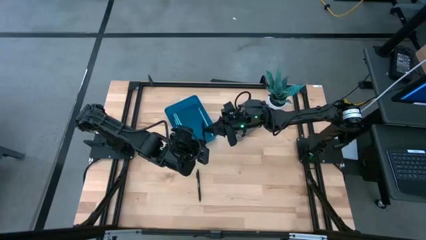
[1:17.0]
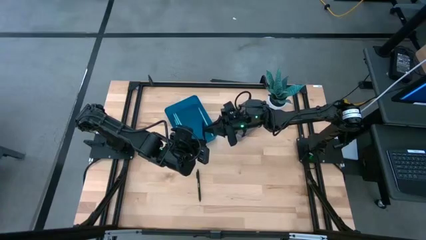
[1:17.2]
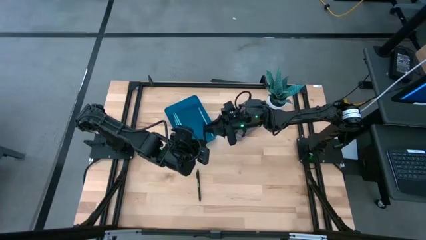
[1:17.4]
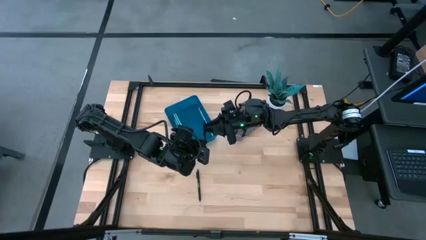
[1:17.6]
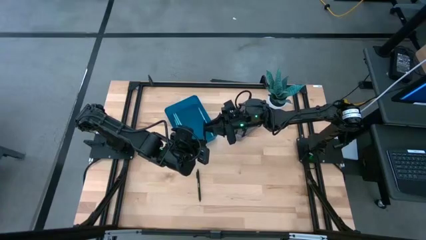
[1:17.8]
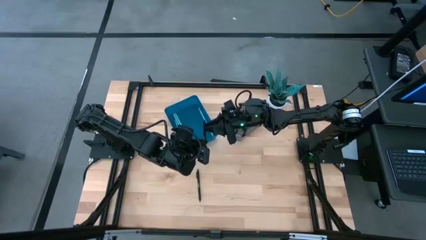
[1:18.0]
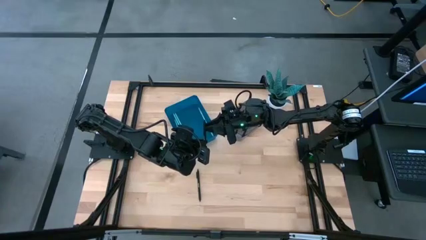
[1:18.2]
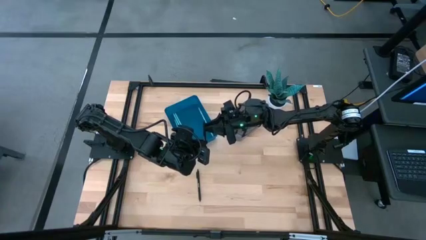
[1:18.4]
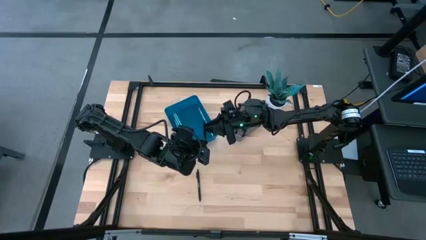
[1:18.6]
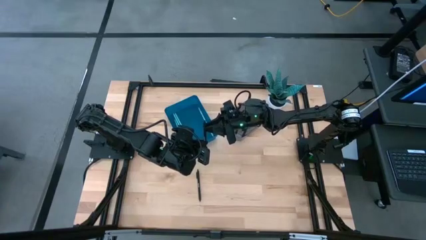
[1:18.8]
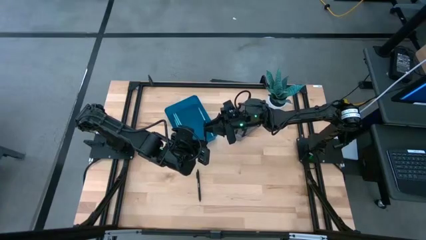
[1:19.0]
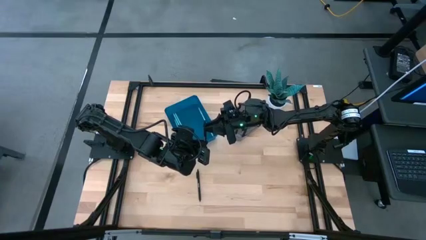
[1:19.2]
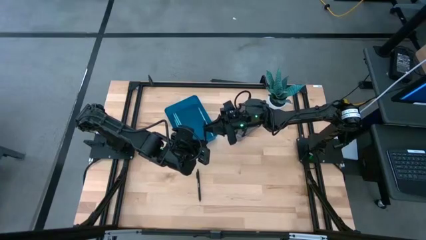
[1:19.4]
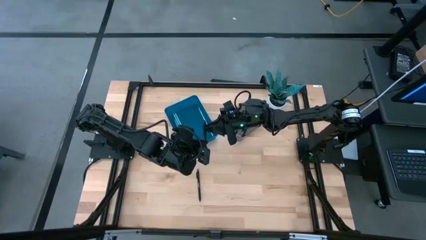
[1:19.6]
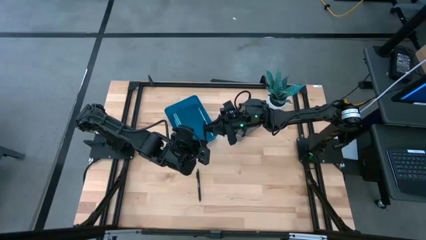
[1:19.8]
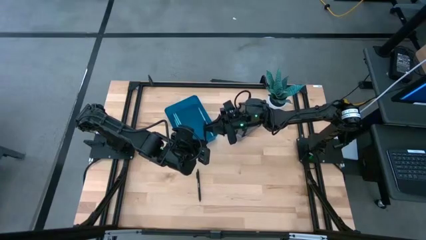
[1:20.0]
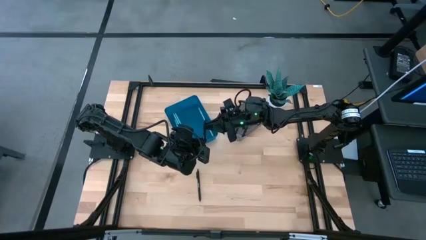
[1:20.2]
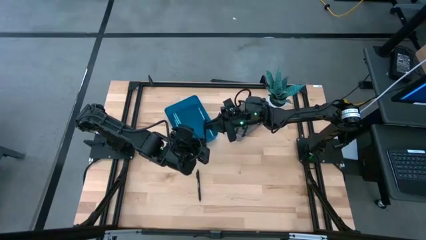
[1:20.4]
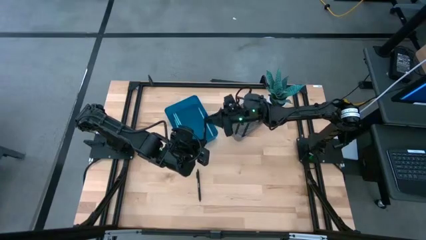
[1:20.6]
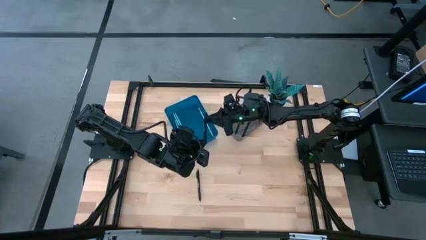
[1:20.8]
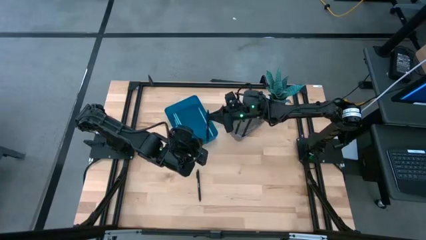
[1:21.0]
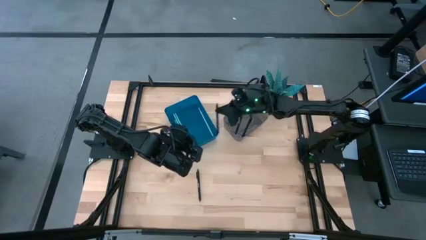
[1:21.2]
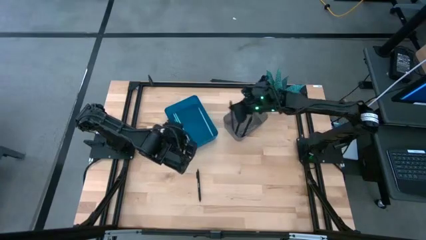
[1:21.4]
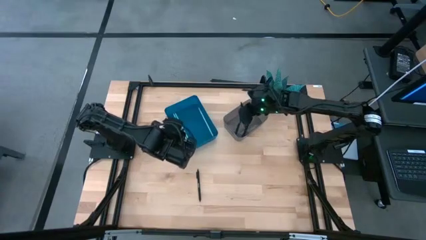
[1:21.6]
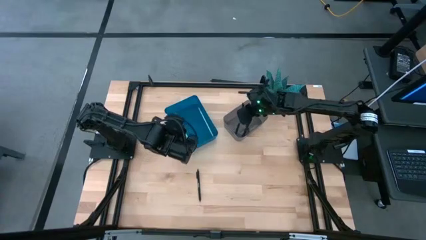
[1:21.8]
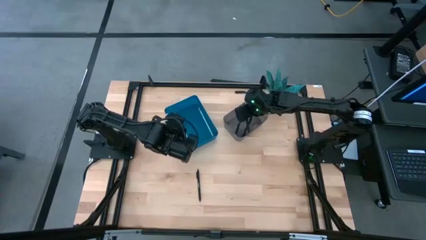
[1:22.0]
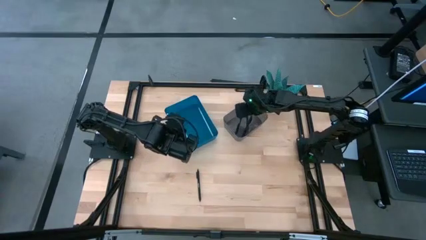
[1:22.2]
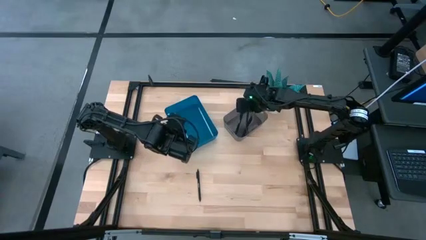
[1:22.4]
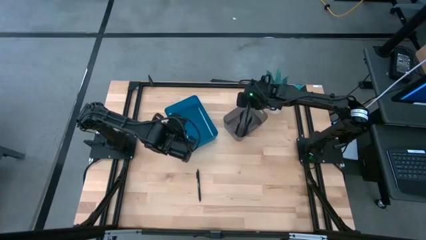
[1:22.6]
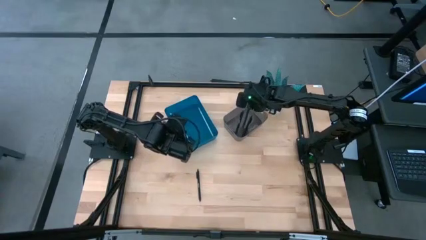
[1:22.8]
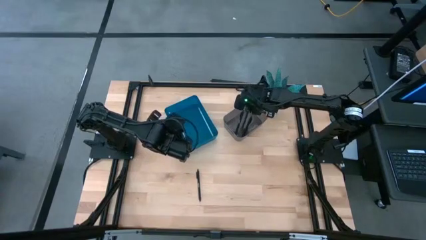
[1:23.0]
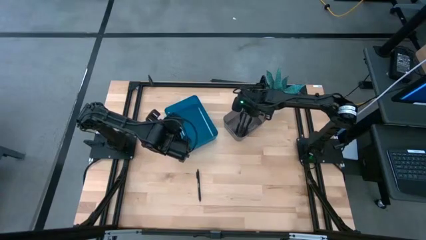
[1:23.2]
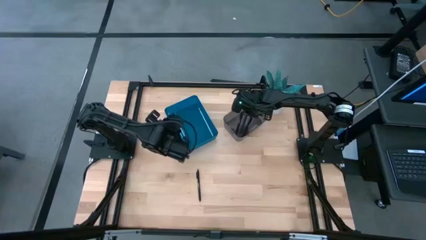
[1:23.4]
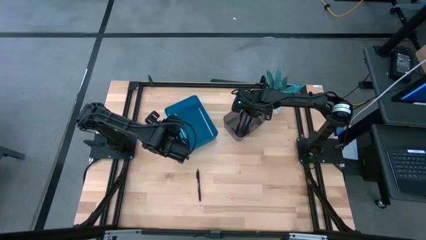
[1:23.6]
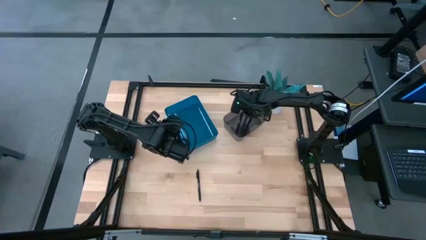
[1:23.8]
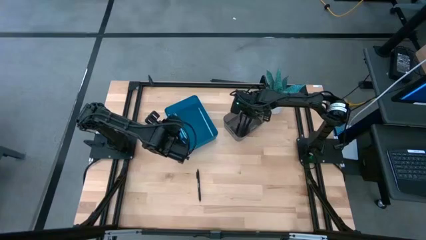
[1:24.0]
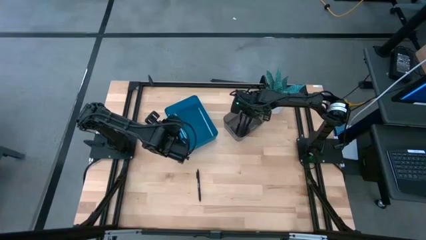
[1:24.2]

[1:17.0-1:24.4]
Task: Sort pens & pencils
Put the left black pen into the gray bin

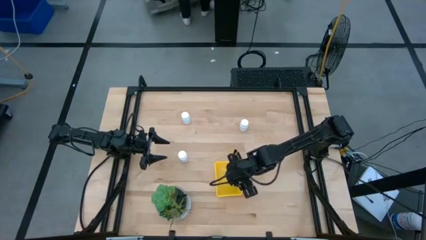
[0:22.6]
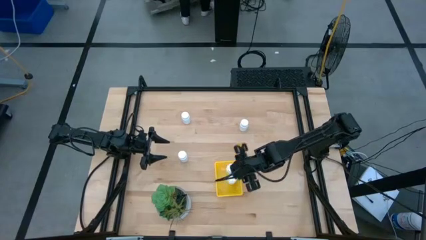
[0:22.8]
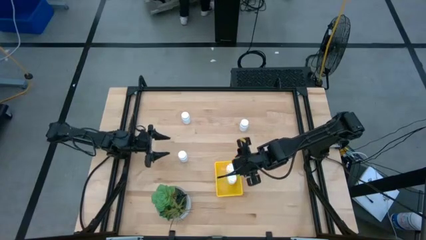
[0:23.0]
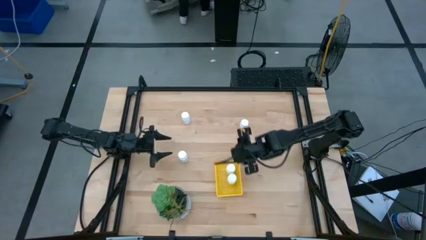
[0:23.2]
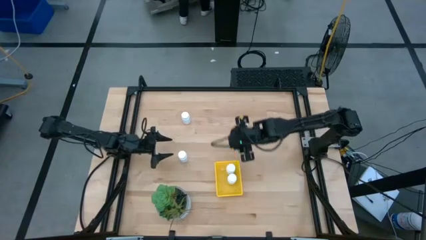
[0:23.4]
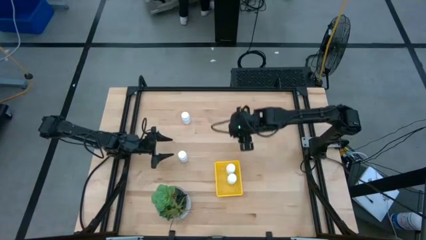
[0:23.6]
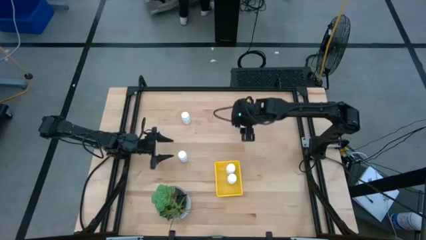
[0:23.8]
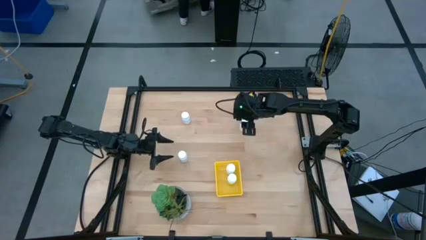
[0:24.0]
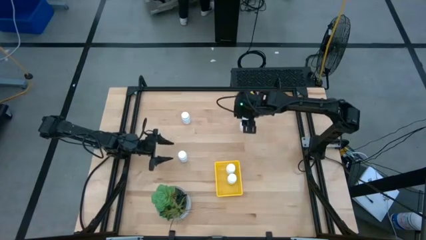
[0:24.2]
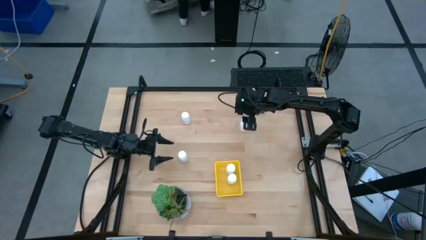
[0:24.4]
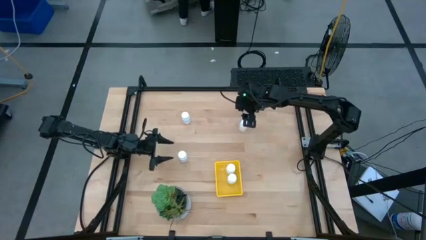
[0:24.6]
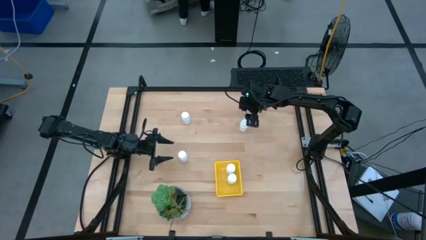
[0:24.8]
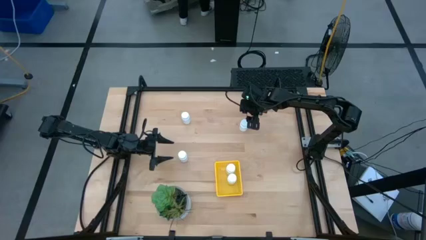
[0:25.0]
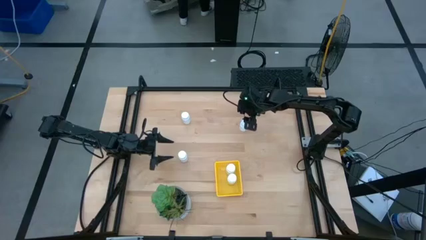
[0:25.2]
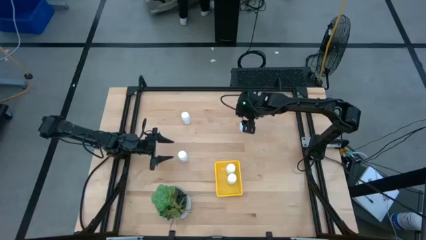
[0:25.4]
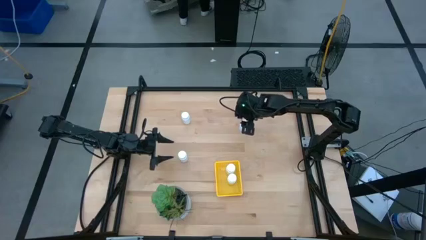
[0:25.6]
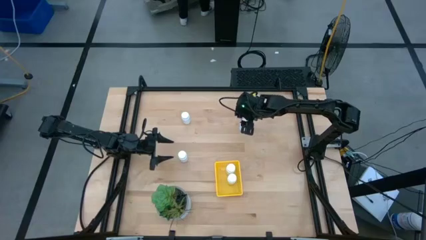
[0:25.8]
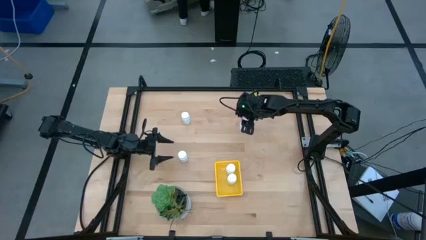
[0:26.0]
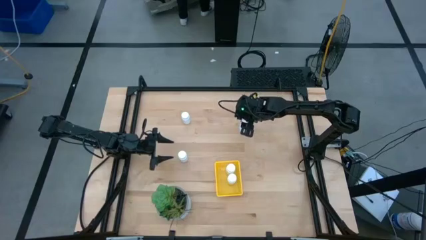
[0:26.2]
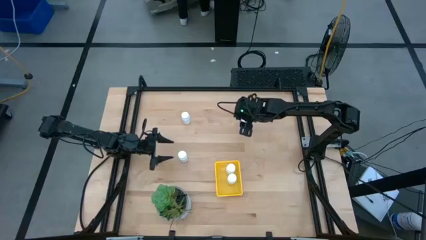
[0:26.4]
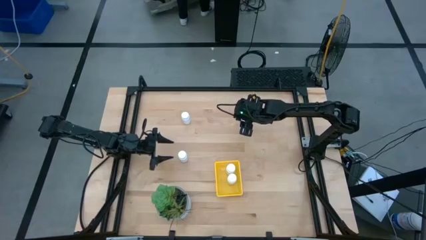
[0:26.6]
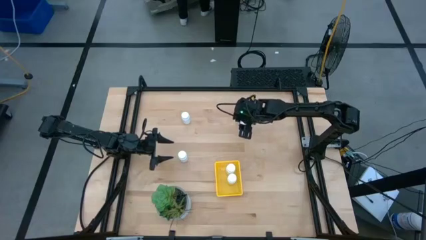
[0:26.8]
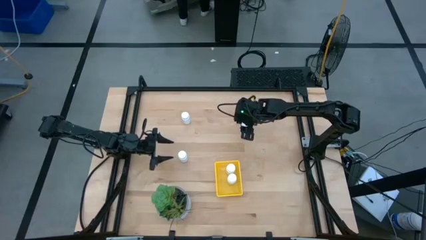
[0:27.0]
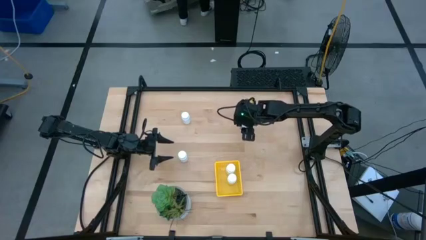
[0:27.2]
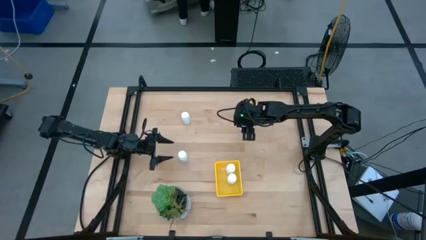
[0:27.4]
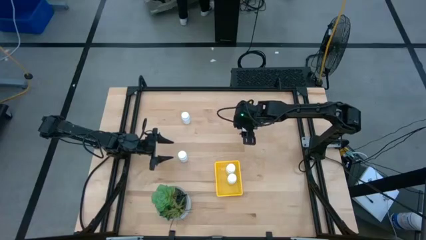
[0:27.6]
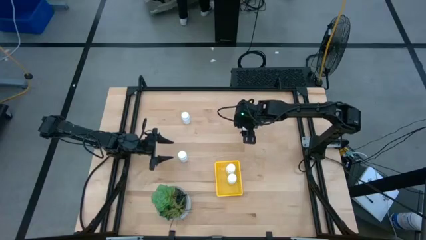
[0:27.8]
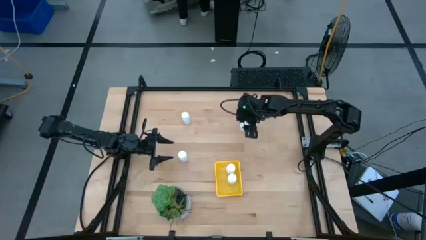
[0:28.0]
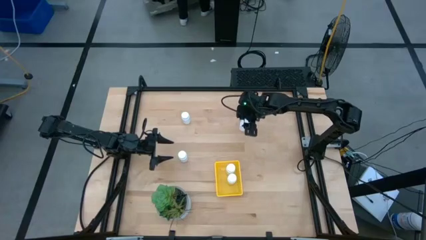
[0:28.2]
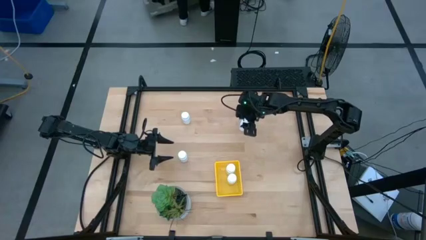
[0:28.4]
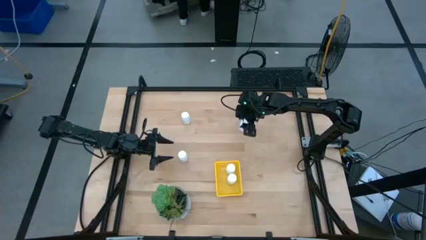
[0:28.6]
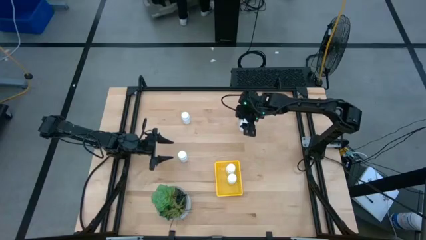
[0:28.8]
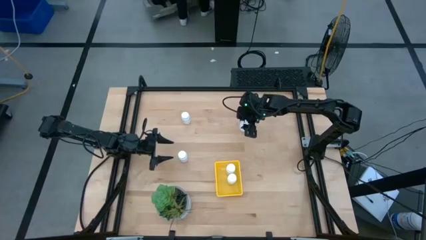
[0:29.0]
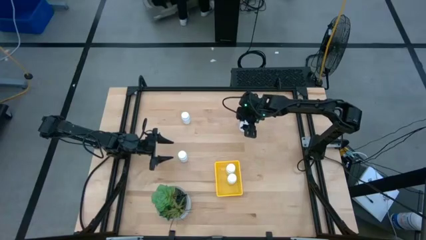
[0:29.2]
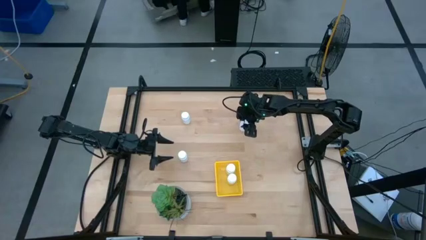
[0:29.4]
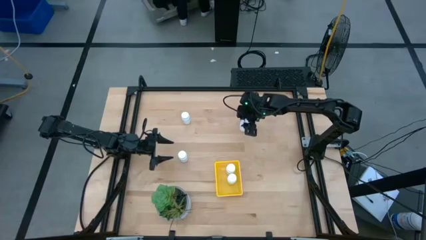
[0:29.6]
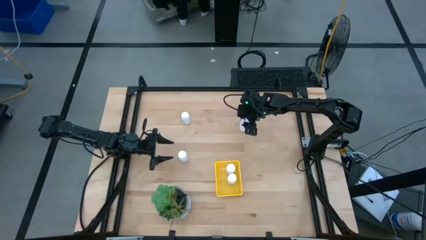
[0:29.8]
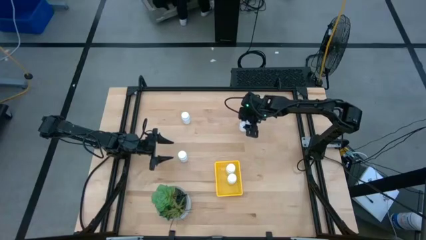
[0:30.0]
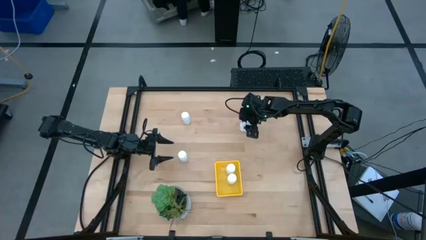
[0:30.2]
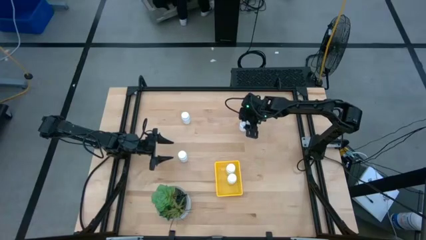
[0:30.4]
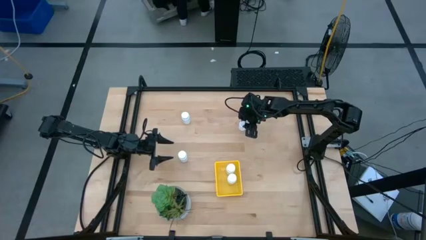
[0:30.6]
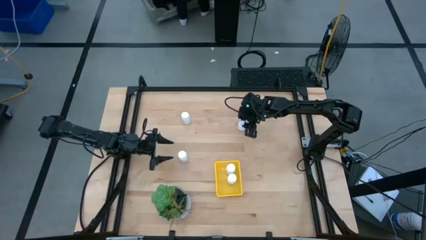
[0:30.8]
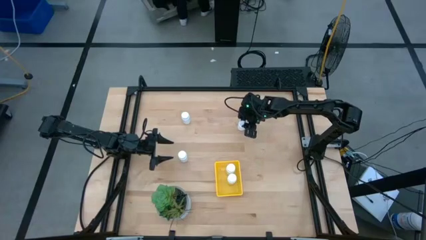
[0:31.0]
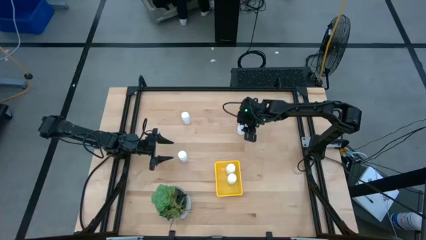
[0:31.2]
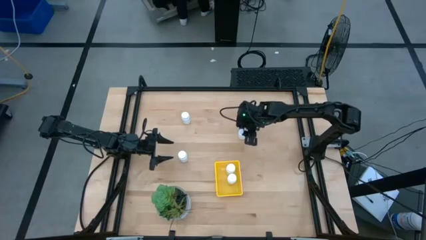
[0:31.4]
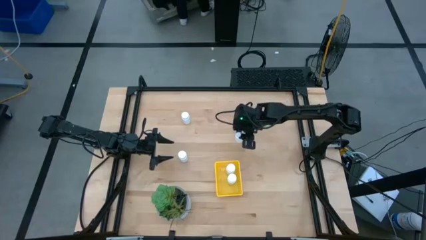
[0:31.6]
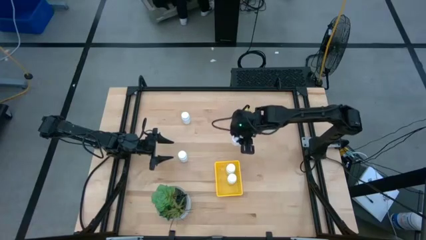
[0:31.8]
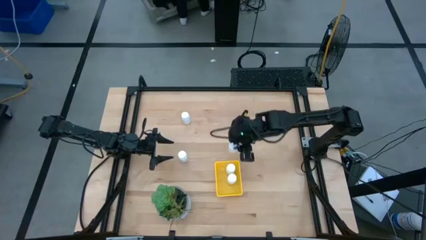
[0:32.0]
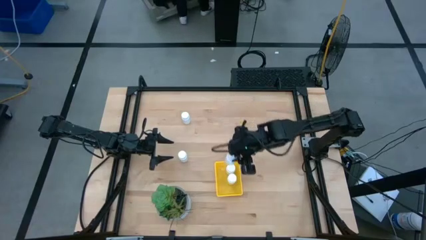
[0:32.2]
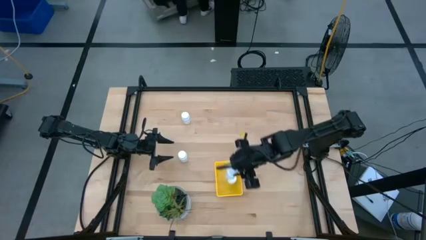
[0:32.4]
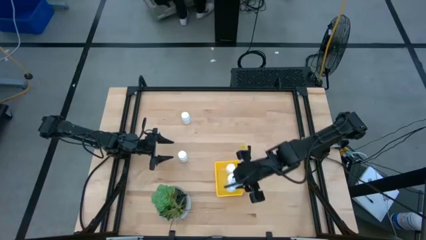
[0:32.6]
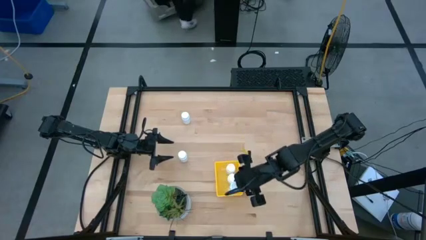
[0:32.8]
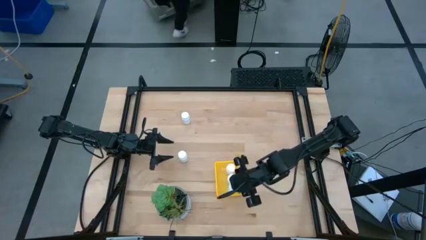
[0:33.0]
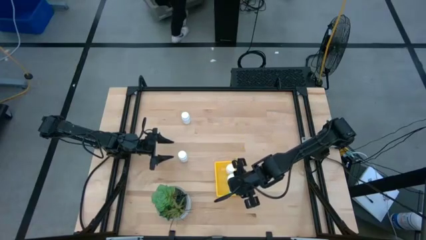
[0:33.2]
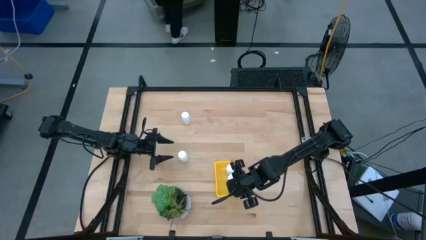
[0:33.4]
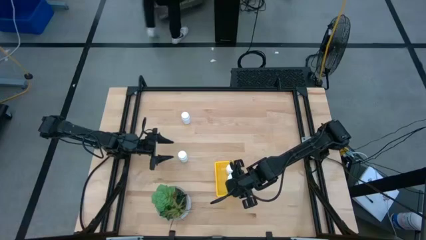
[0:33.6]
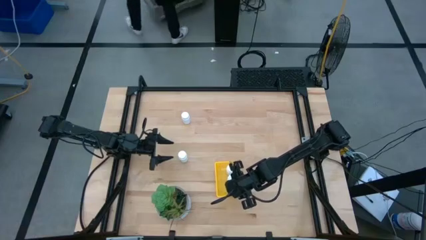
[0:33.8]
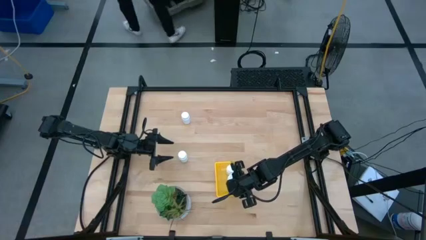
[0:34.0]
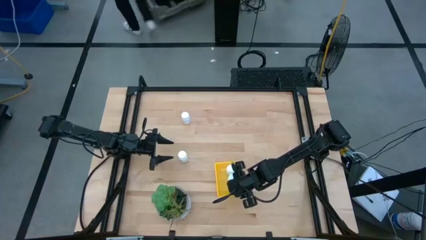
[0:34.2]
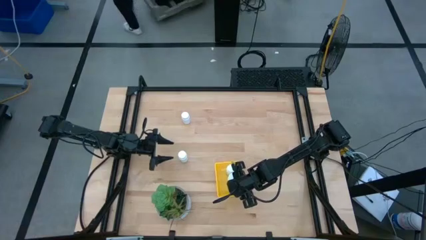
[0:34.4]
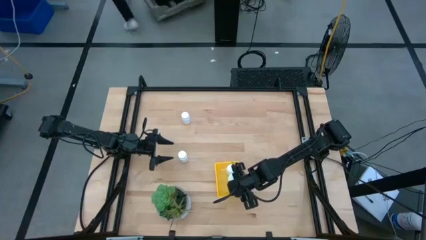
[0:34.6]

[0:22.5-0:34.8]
Task: Pick and place pill bottles into a basket
Put the white pill bottle into the yellow bin
